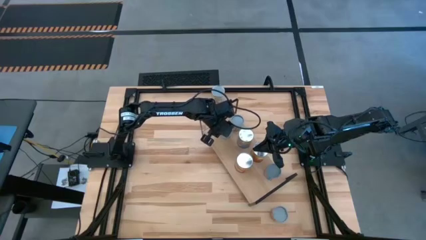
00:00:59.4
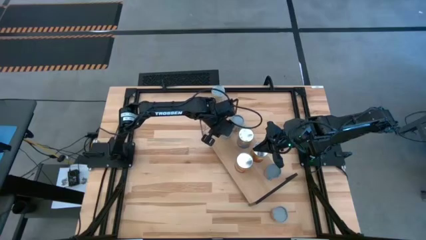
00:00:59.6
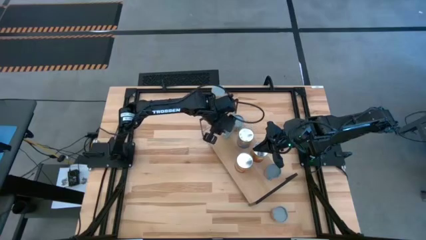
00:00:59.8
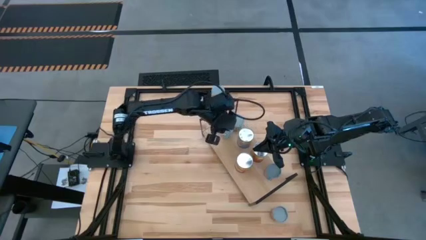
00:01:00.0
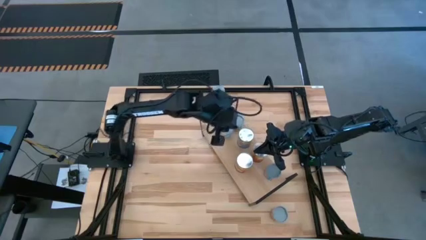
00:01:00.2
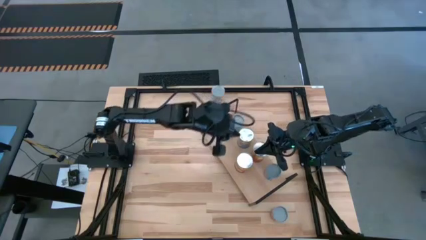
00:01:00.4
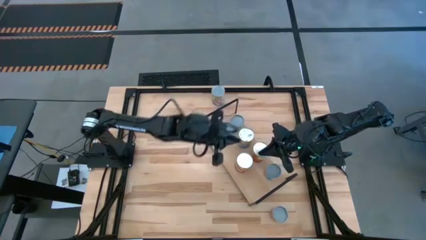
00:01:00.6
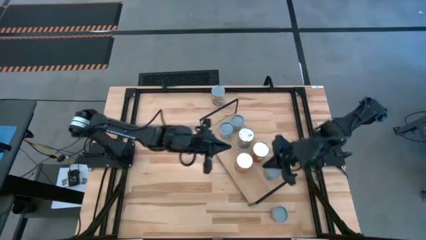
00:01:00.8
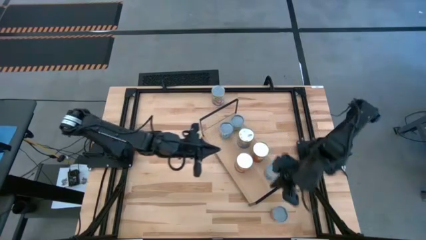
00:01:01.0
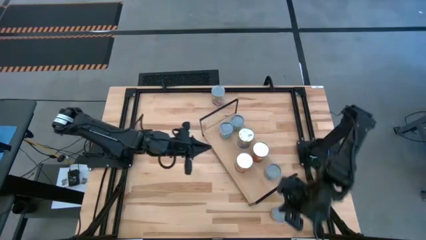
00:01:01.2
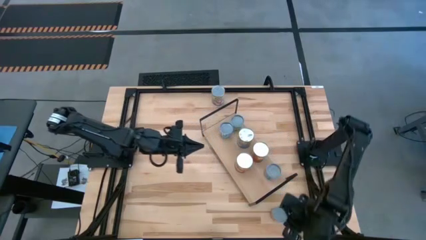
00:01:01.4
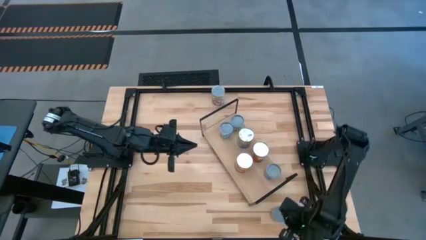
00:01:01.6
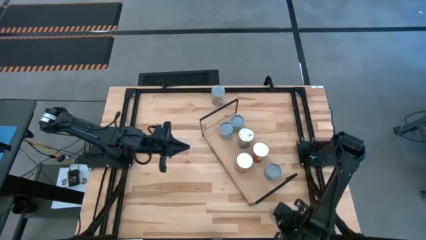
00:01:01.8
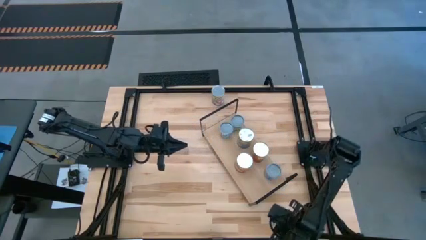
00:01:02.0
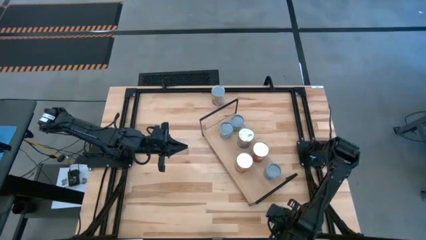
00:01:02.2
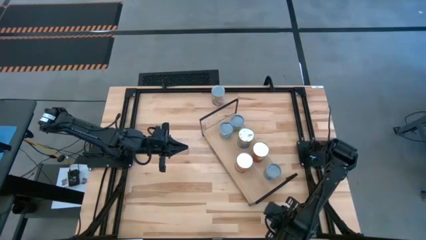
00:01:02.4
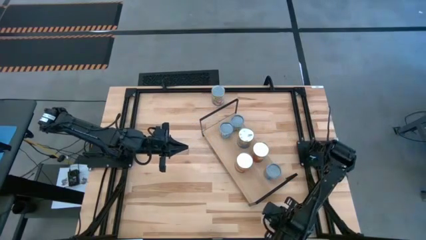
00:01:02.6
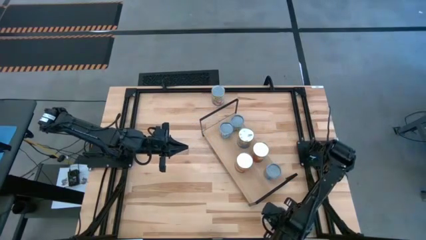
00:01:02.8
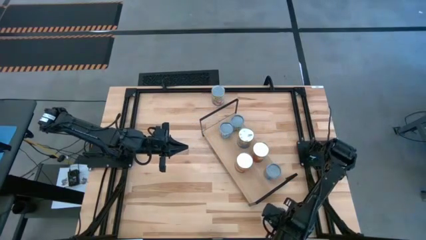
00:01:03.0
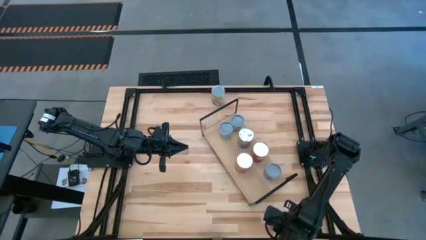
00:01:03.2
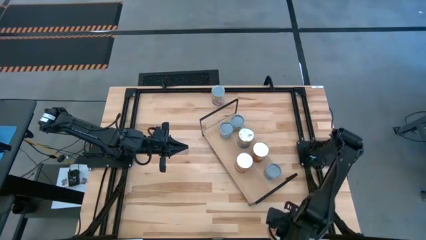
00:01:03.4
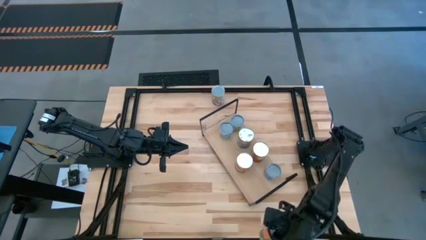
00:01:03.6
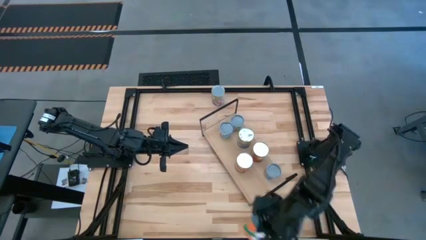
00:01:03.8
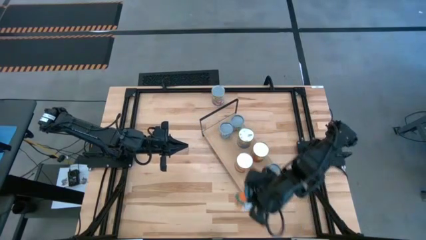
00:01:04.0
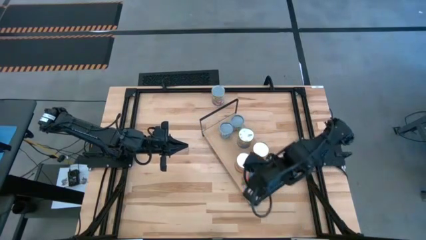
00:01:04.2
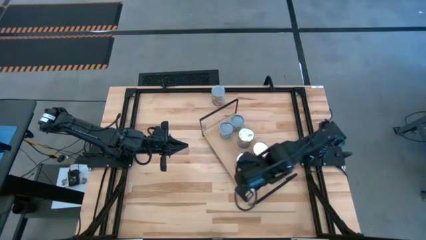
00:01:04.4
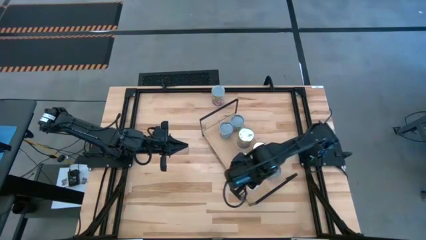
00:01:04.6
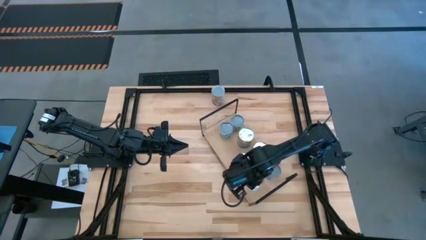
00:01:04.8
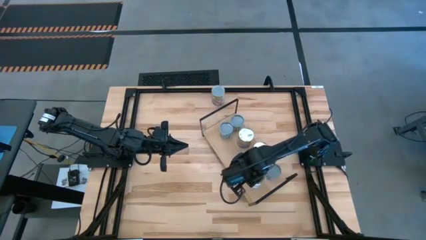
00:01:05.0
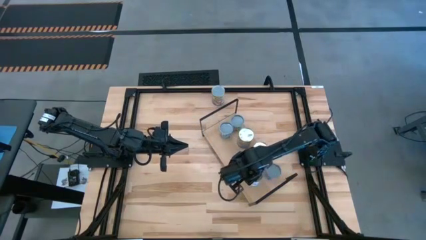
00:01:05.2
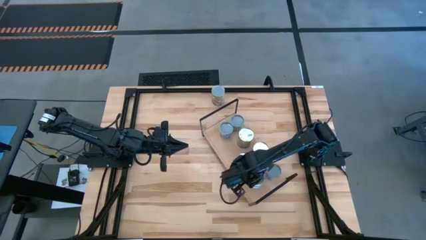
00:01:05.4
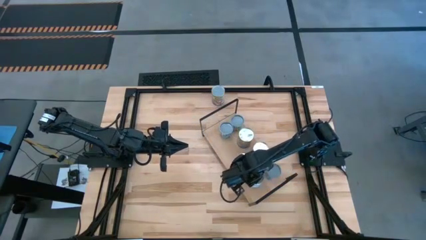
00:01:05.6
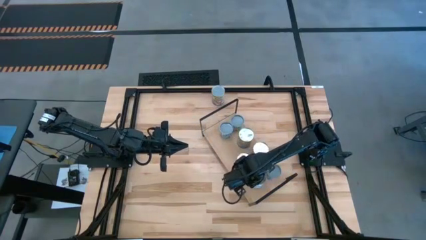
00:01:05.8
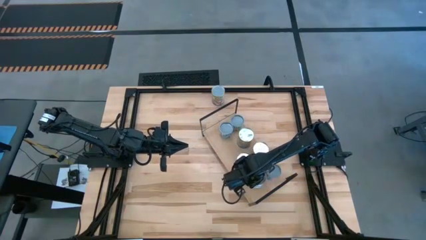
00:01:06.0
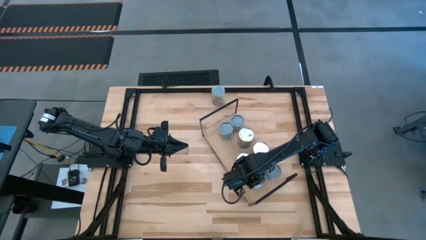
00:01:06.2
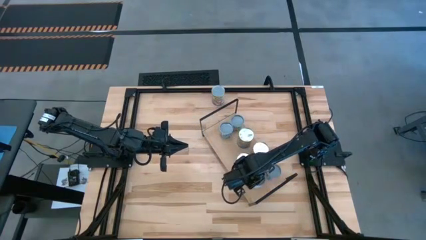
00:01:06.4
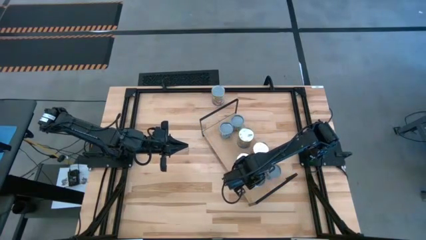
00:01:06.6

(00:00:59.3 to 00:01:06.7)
Task: Pick and place cans onto a shelf
Put the canned oranges on the shelf

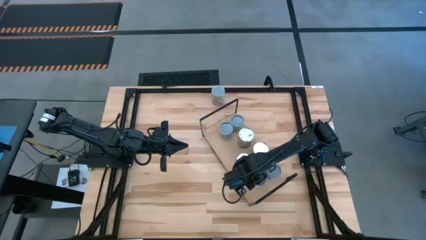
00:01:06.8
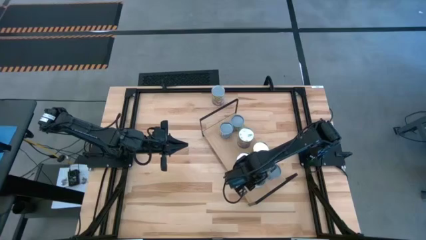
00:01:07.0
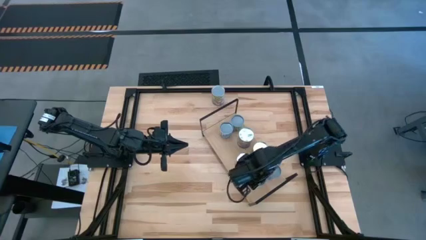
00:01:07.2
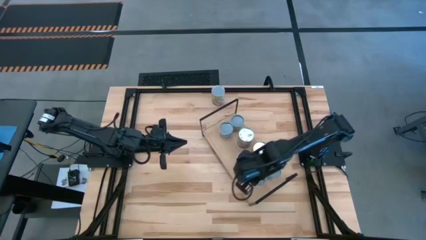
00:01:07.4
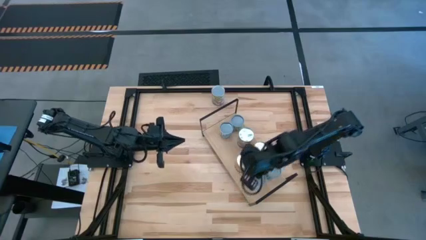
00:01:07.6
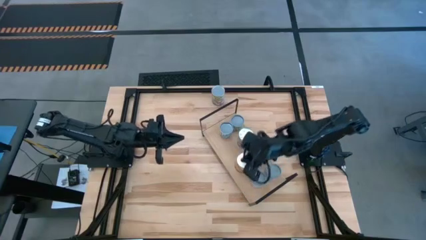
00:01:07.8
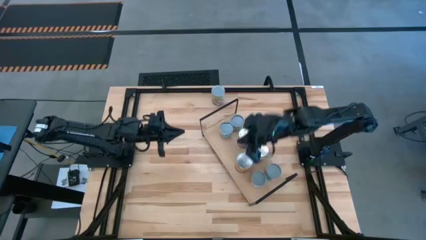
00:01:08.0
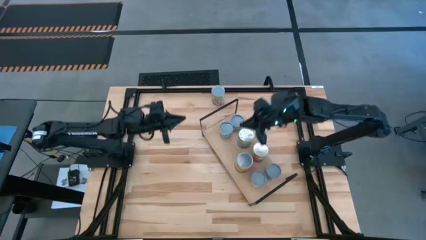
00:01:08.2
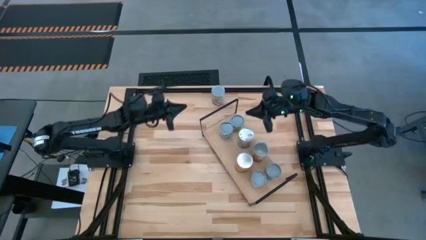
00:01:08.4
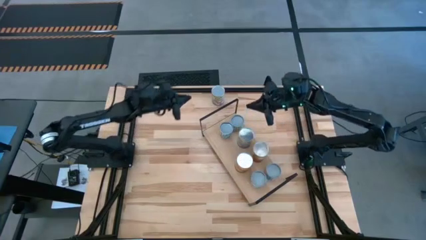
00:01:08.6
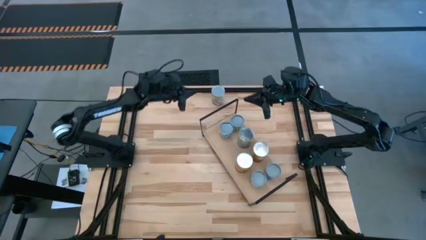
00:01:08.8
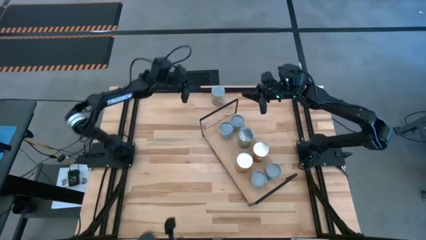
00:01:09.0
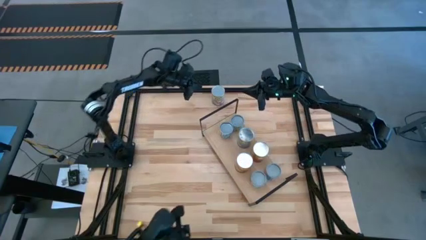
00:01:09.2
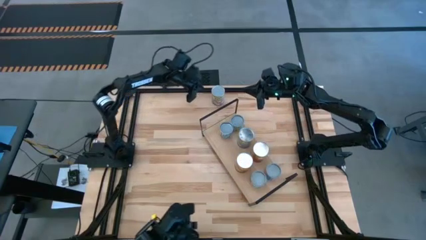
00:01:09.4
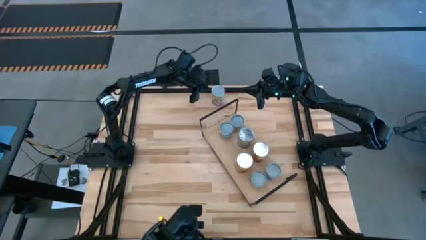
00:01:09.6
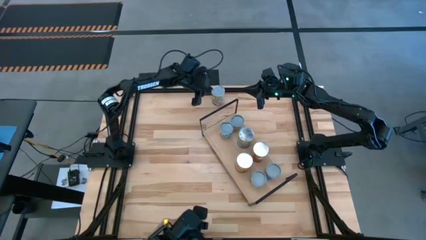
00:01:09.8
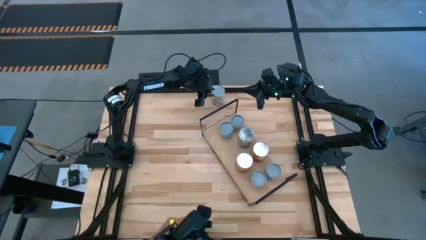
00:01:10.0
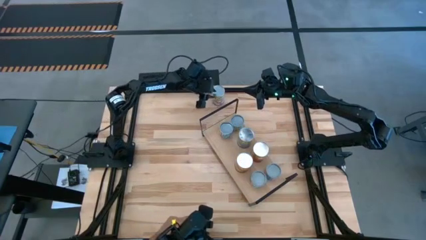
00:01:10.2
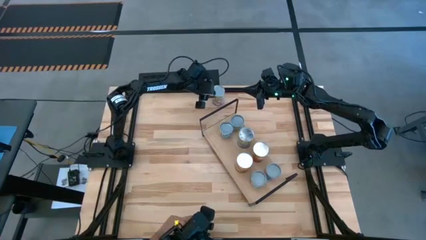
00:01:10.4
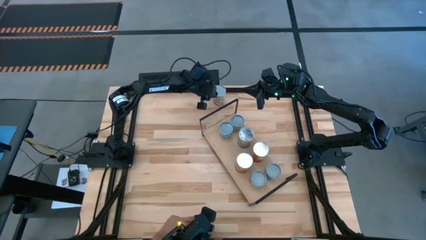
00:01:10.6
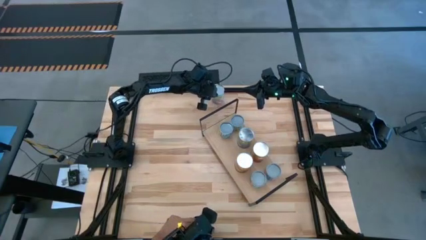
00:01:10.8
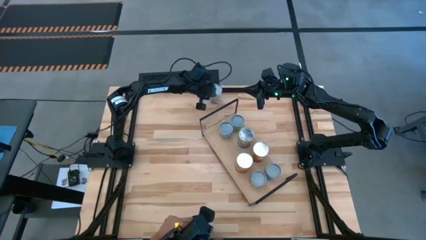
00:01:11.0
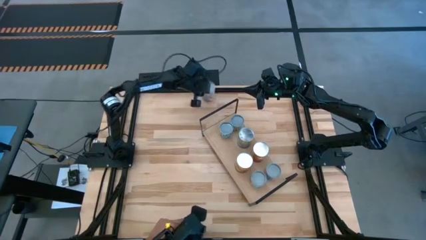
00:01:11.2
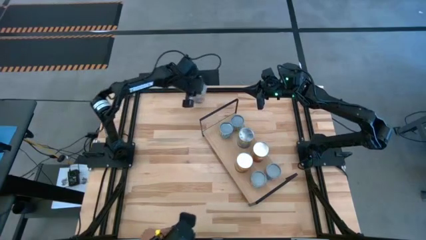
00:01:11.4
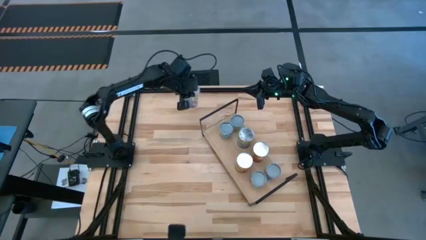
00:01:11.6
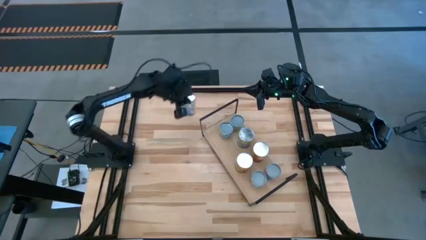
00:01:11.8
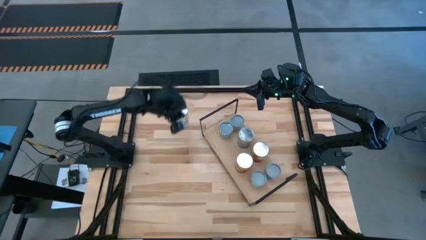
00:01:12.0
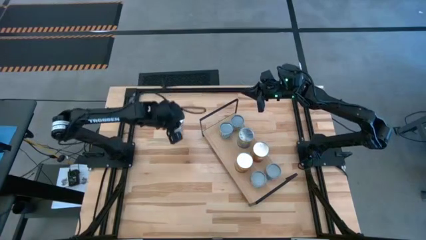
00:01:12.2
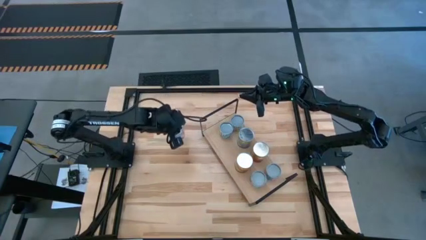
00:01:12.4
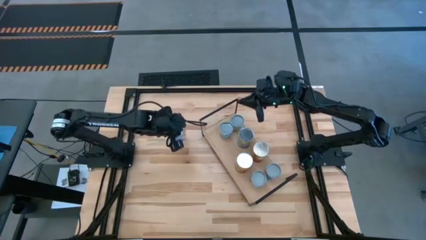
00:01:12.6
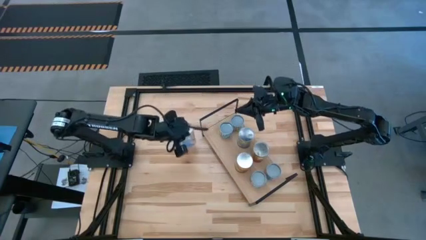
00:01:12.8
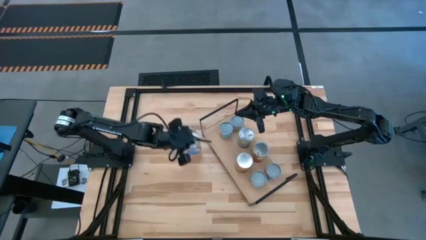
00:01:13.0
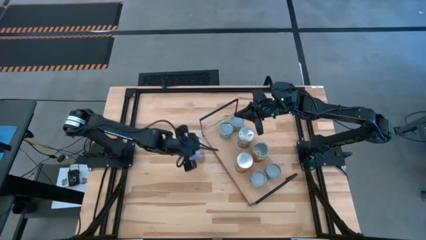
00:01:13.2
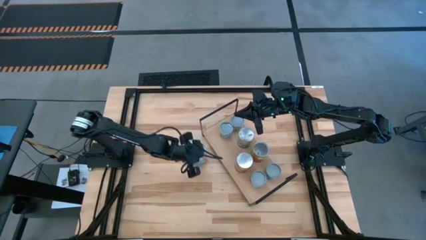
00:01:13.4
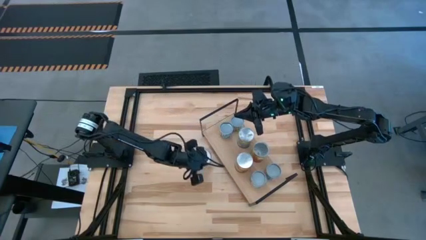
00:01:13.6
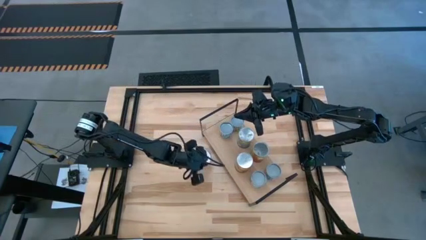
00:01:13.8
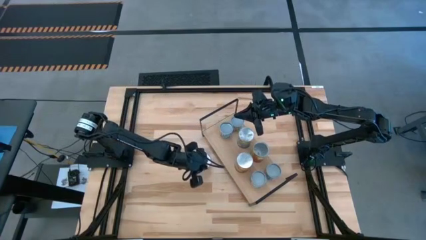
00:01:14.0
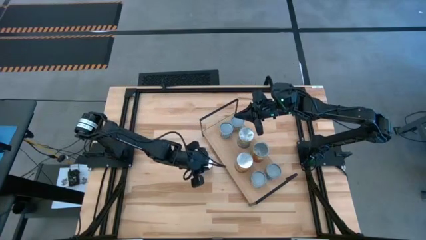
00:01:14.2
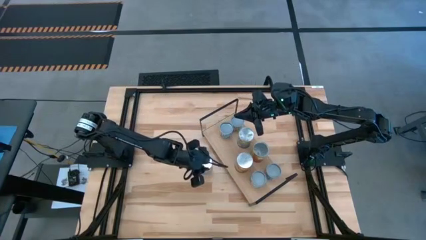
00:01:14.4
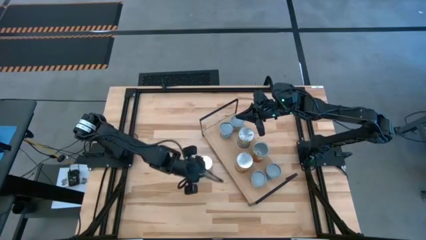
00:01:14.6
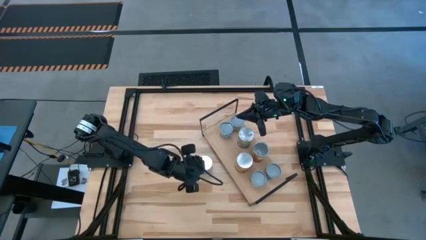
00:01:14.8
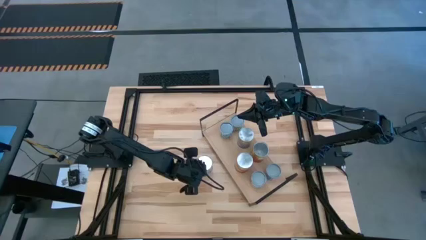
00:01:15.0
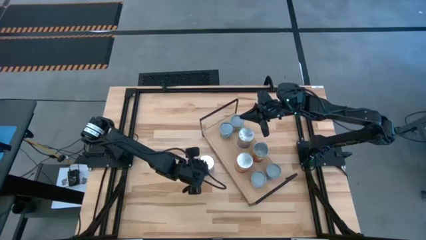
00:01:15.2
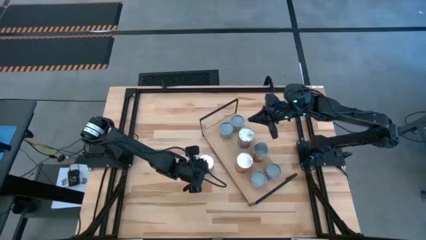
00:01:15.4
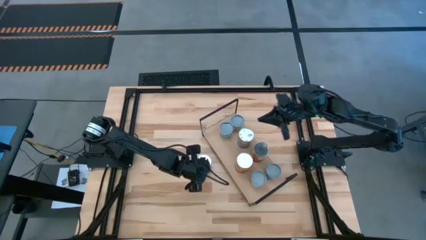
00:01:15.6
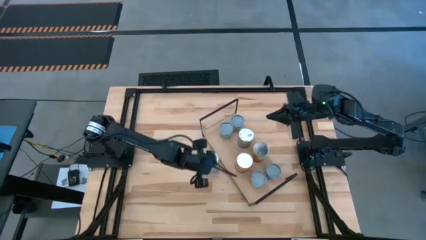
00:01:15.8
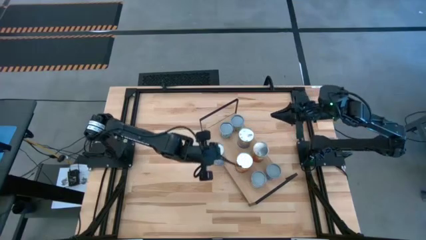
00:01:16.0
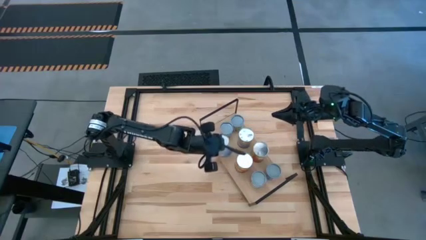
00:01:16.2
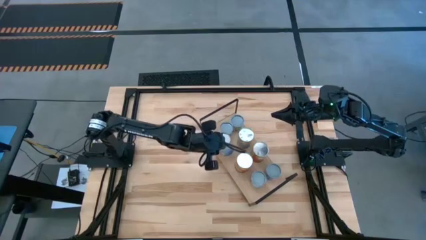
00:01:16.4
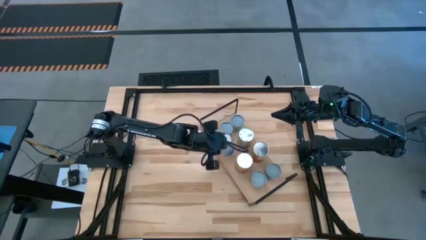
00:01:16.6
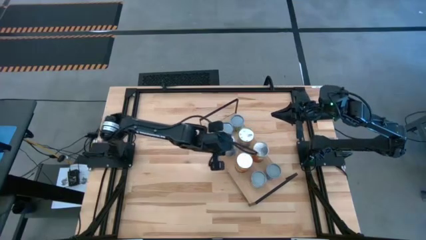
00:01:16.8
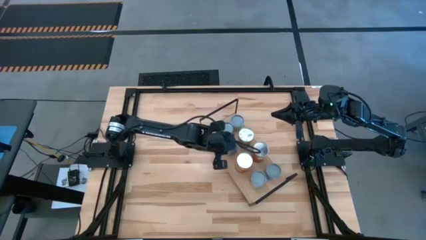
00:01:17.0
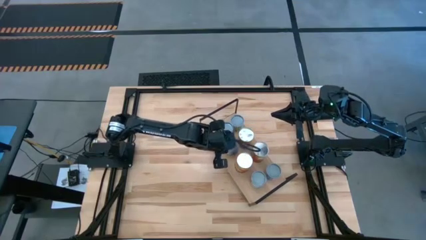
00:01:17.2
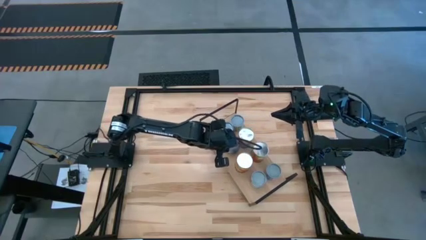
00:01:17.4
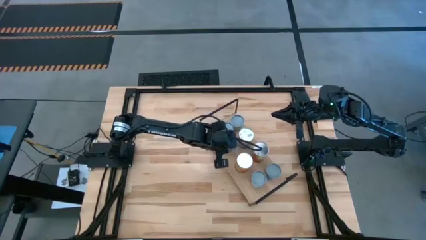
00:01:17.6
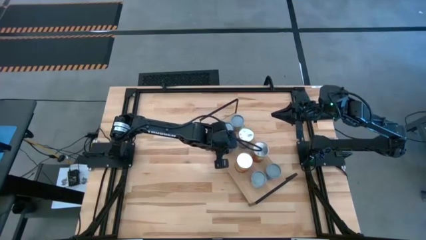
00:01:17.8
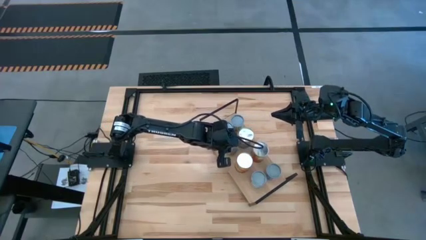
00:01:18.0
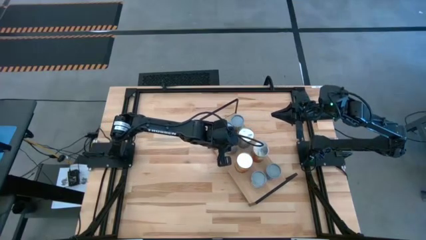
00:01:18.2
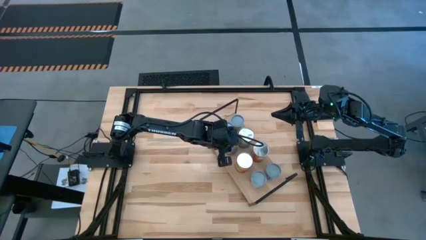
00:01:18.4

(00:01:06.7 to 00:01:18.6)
Put the canned peaches on the shelf
